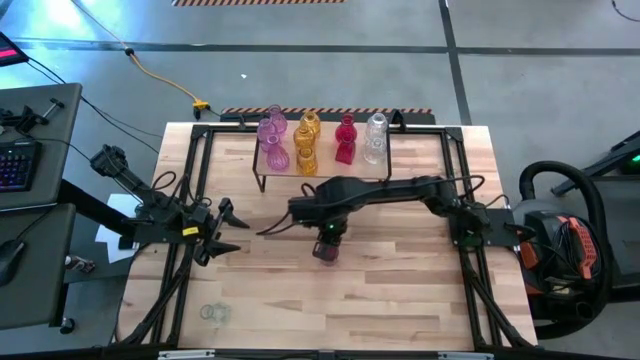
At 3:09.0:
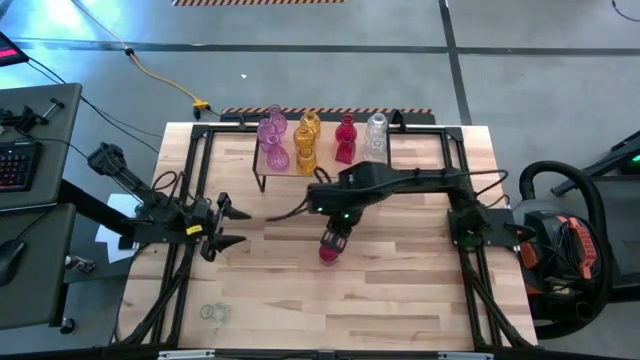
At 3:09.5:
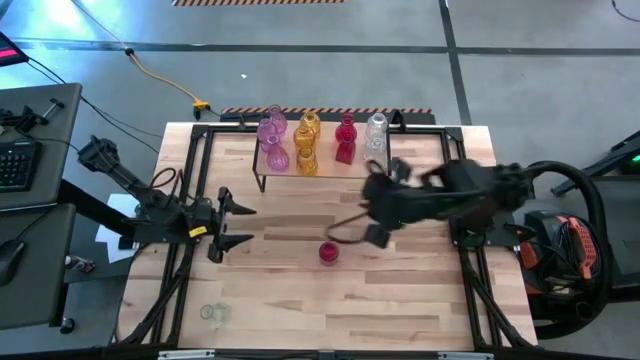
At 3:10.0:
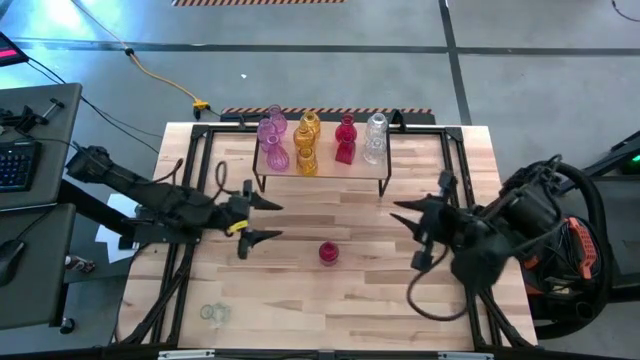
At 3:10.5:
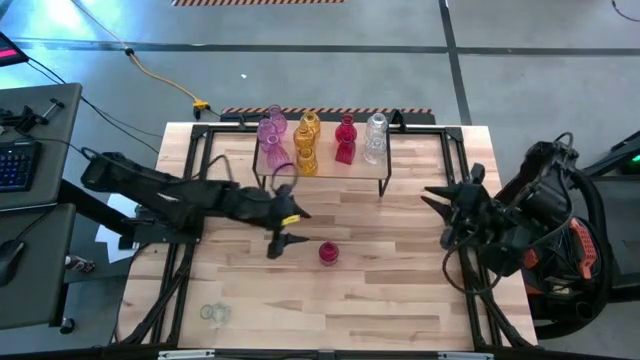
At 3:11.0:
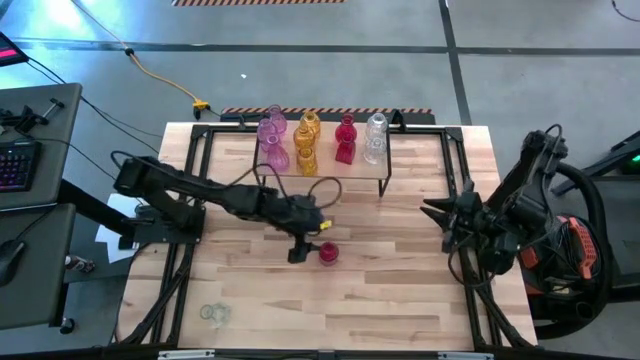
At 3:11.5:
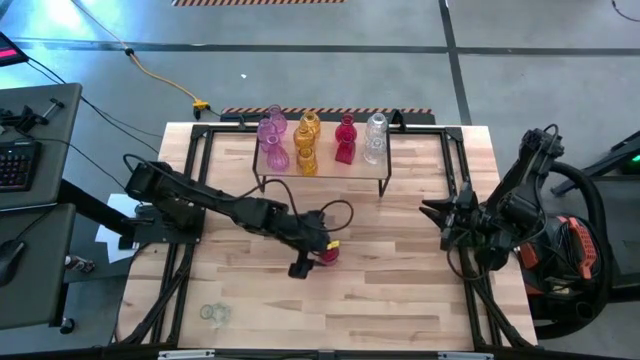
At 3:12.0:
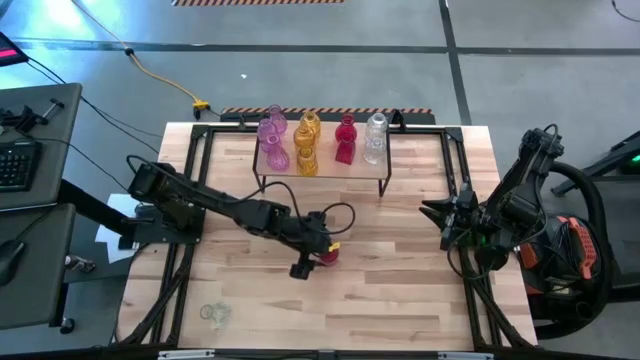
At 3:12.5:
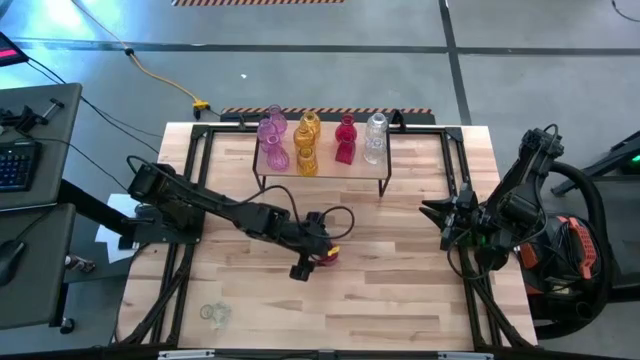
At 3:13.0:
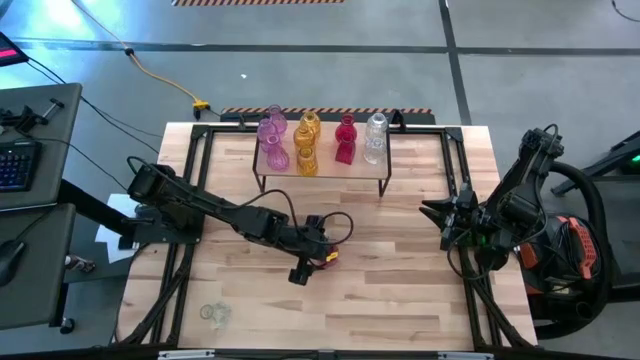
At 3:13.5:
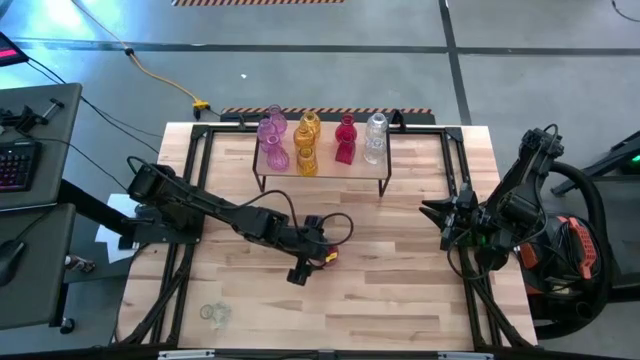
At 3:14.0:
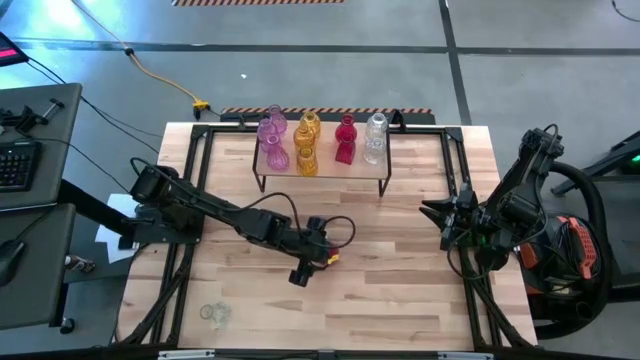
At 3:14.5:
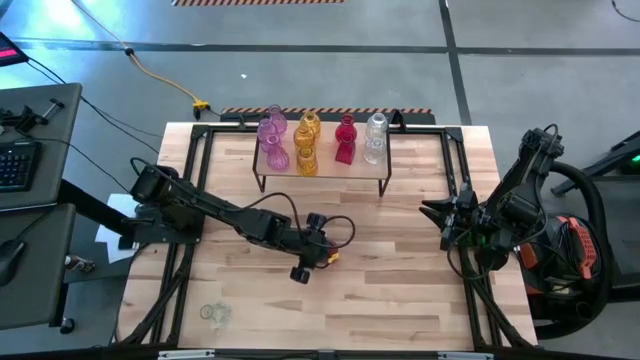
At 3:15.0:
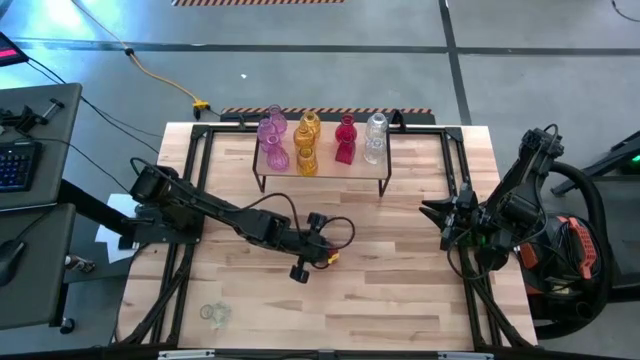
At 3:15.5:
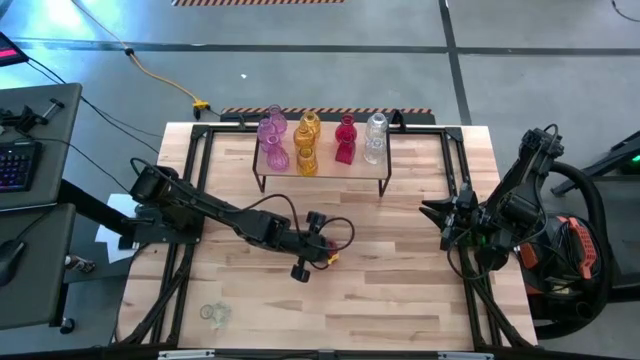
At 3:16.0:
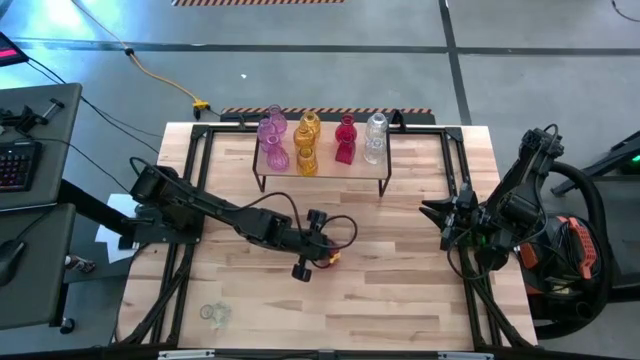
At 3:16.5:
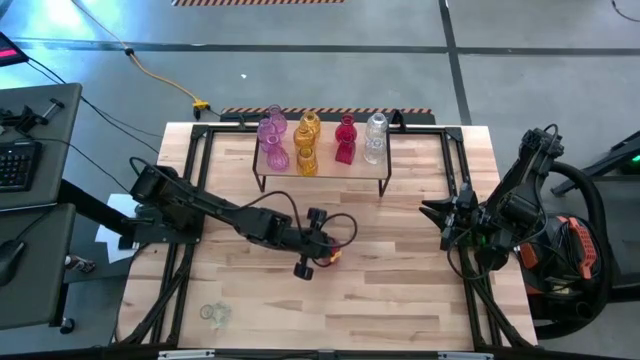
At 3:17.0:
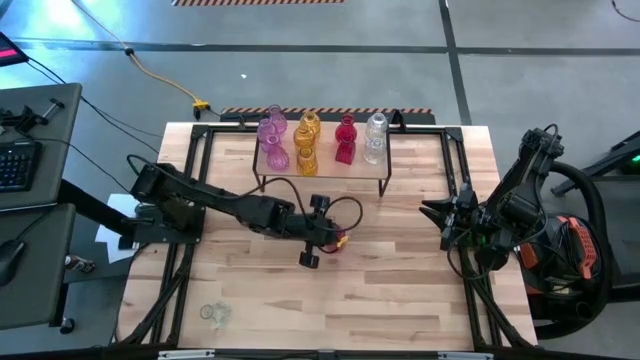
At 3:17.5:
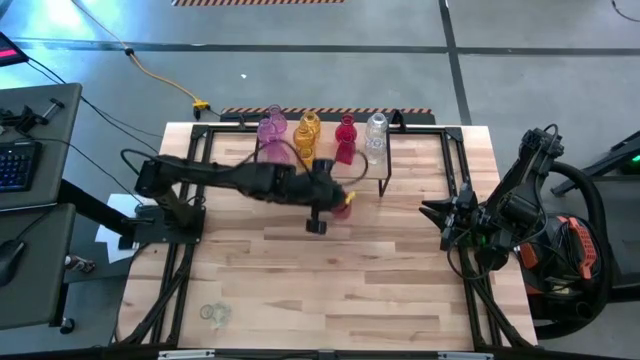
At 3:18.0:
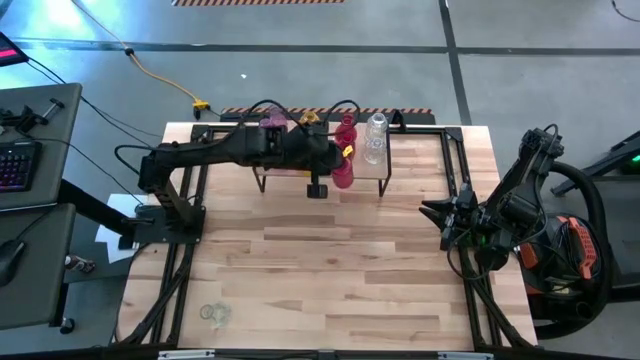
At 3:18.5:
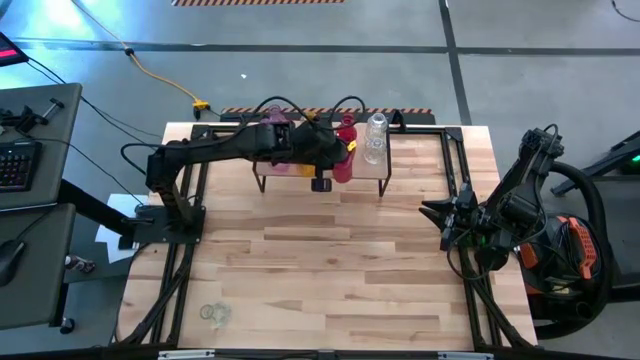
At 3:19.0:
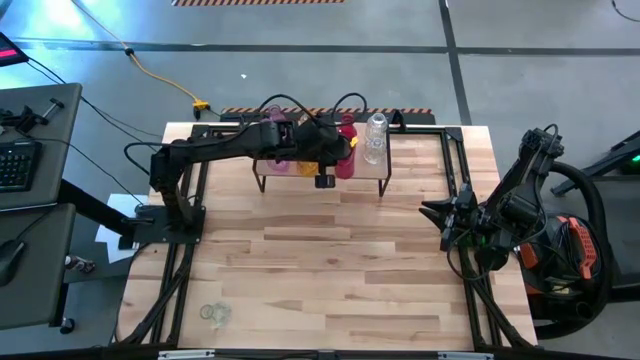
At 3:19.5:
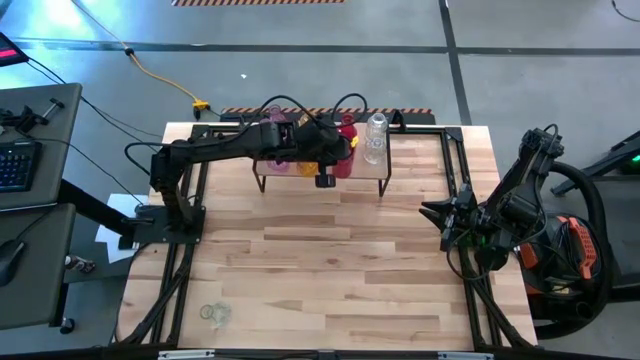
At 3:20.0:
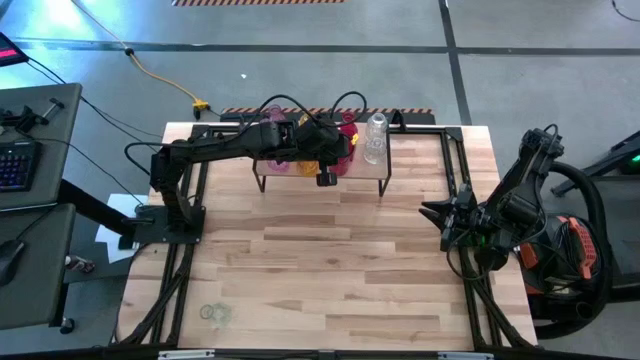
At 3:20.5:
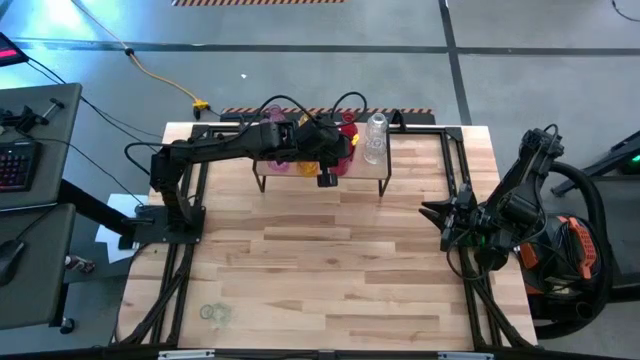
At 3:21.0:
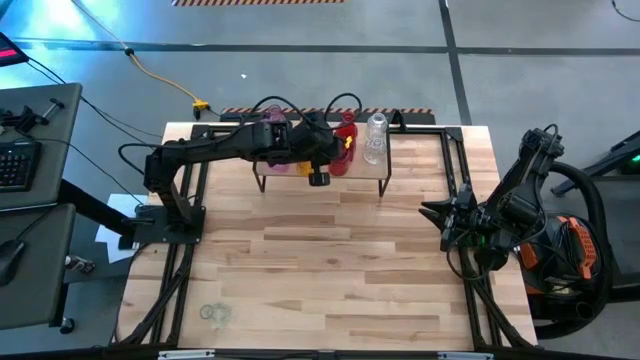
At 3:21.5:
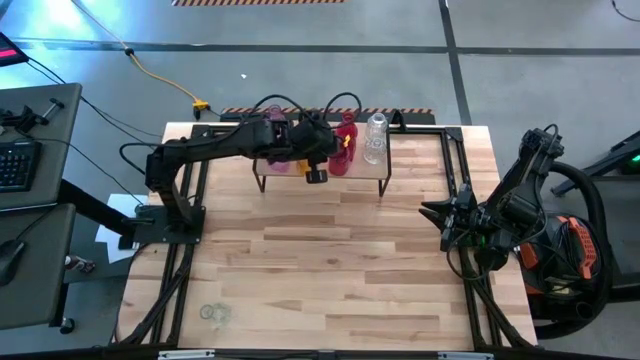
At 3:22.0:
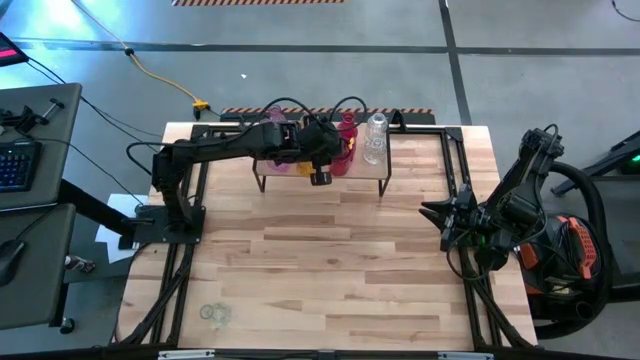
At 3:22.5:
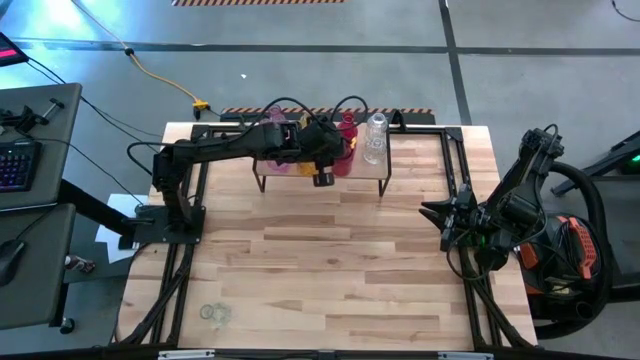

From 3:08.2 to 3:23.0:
Task: sort vases onto shelf
Put the red vase on the shelf aligned with the other red vases

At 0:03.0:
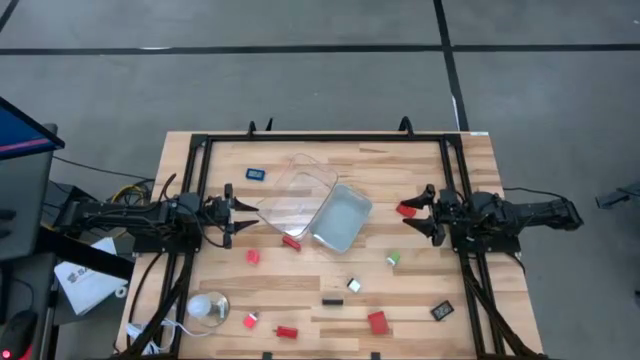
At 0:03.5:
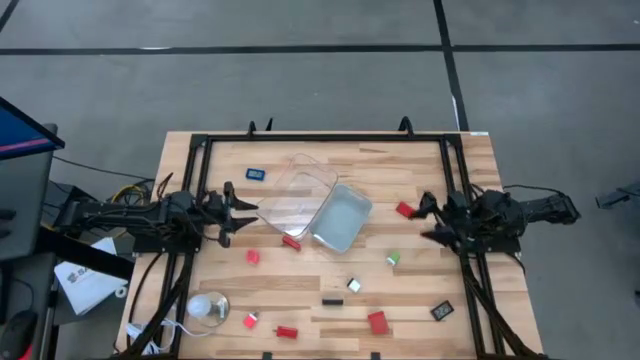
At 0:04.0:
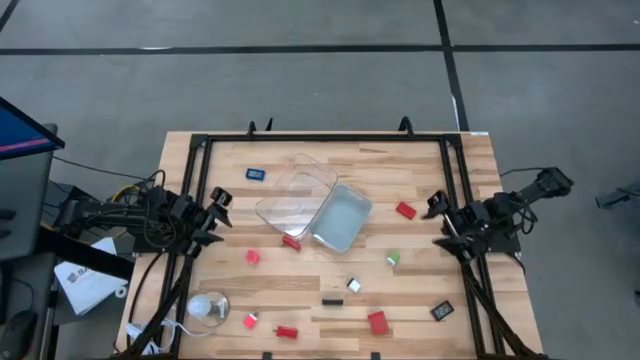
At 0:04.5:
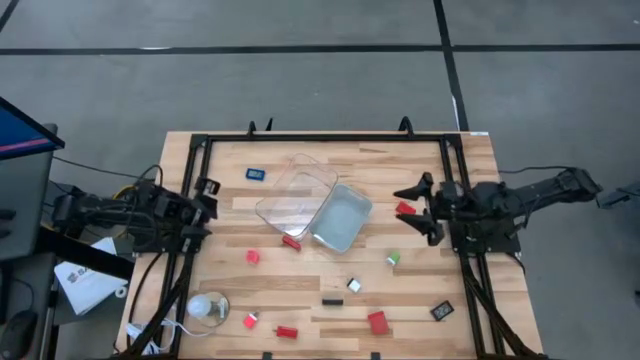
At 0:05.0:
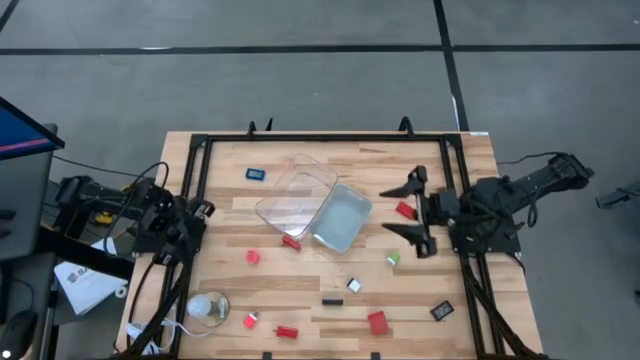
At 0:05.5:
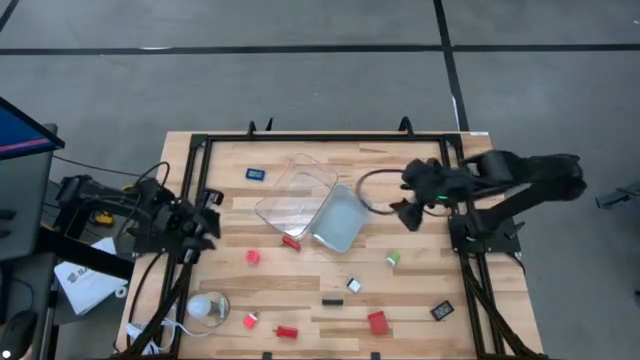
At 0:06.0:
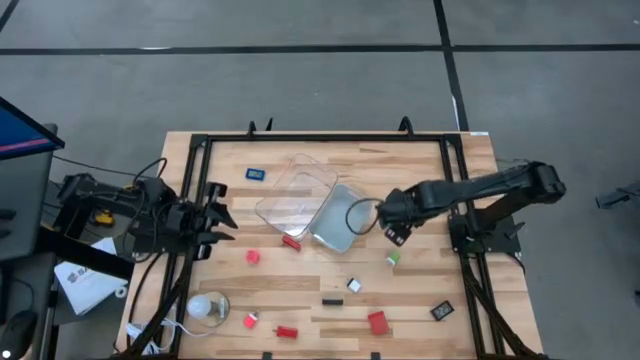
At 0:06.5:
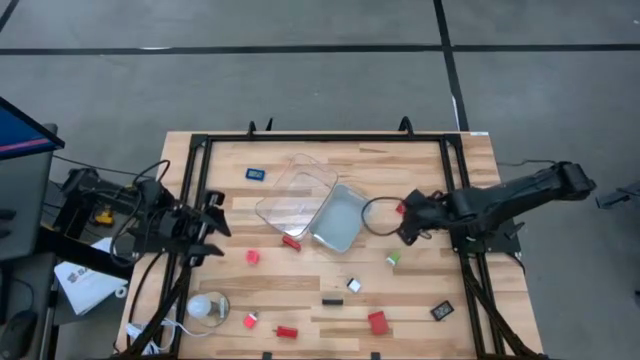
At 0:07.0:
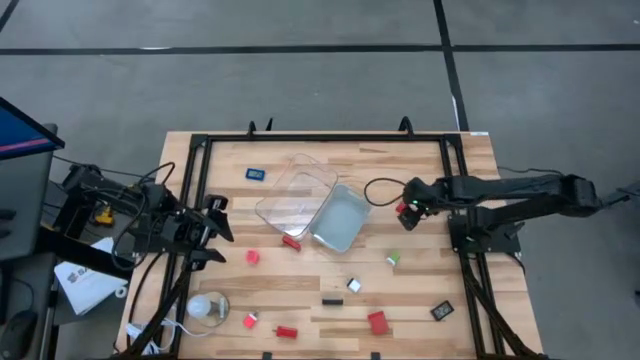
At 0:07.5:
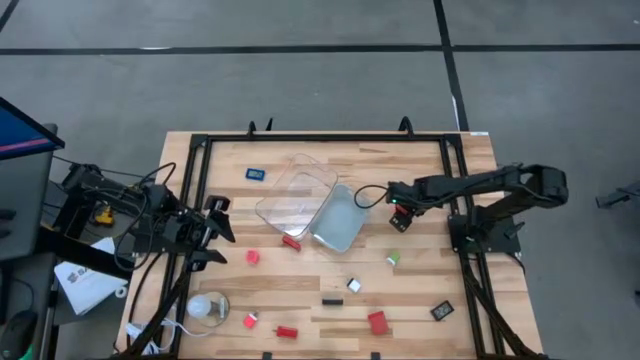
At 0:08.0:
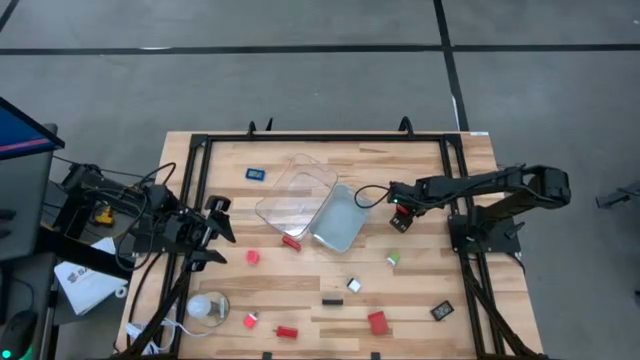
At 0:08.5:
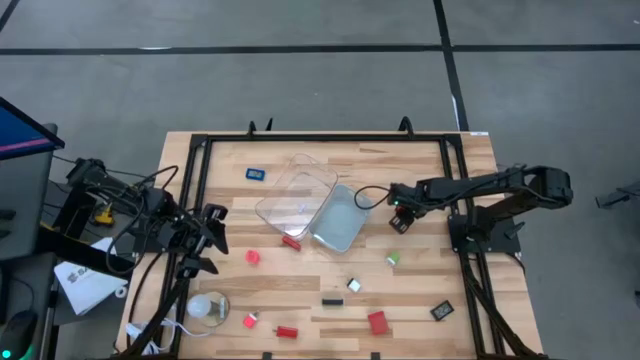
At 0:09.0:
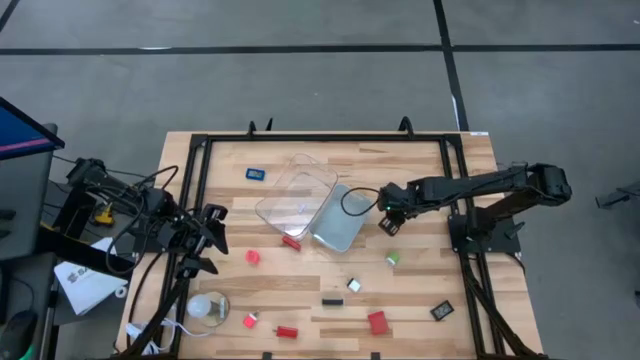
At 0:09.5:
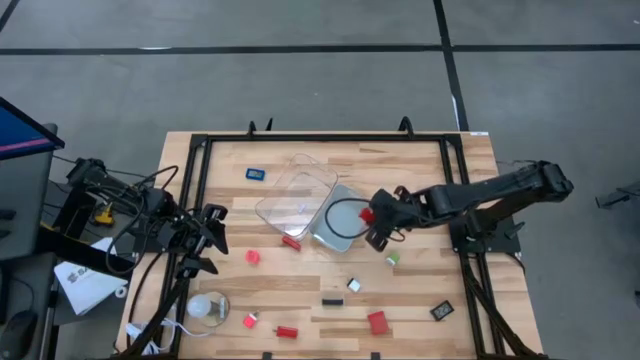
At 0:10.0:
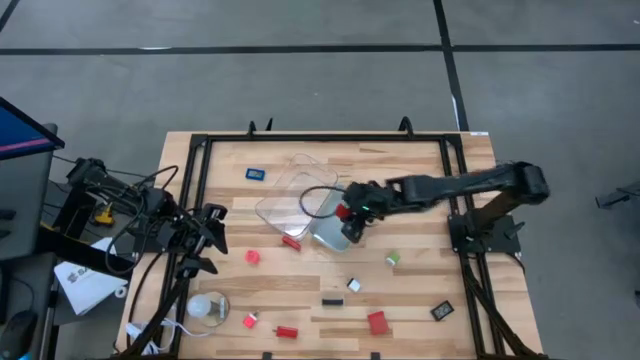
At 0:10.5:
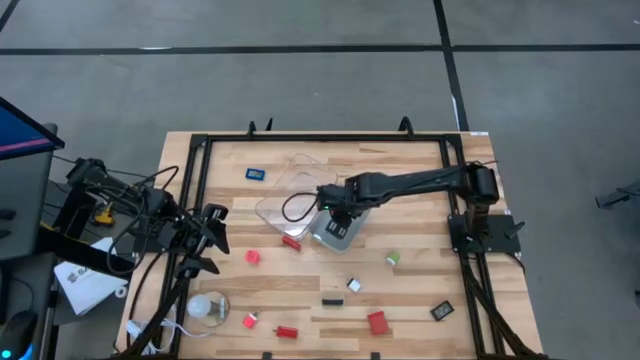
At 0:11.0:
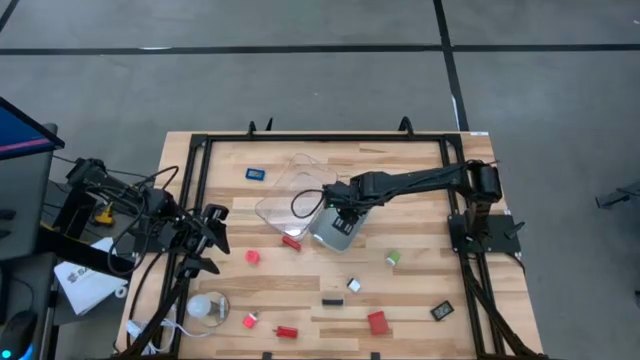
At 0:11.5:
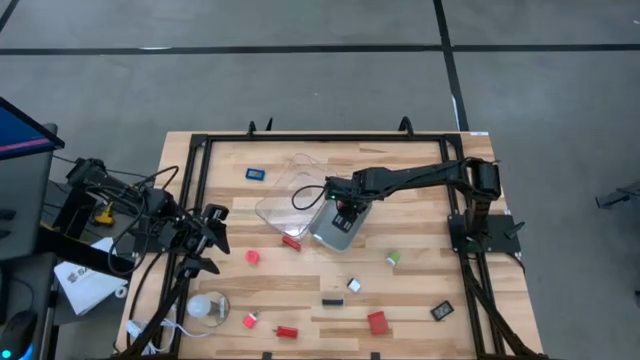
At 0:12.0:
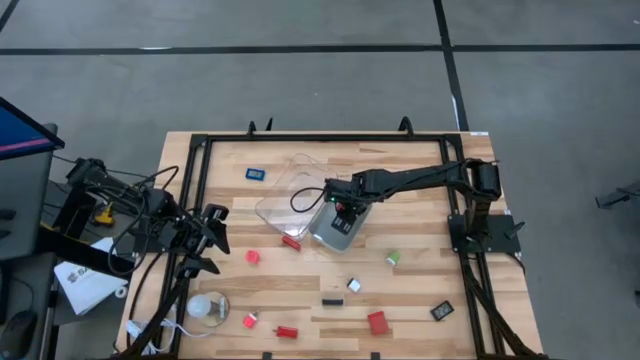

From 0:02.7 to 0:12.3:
Task: Pick & Place Office items
Put the top red digital timer into the gray bin
